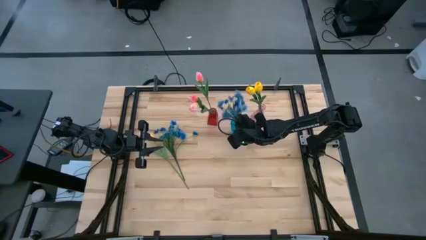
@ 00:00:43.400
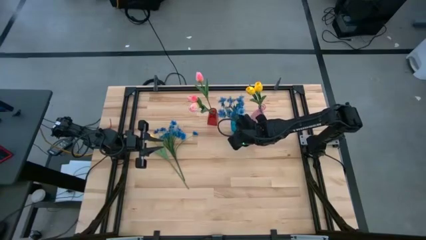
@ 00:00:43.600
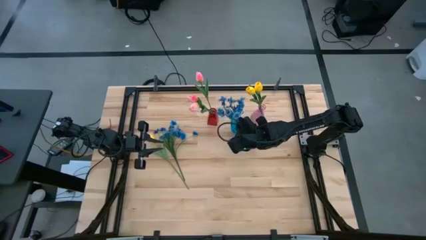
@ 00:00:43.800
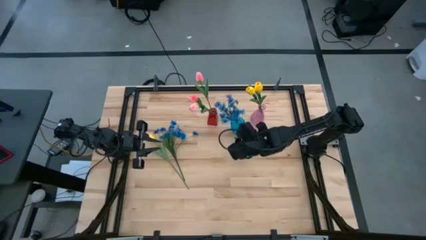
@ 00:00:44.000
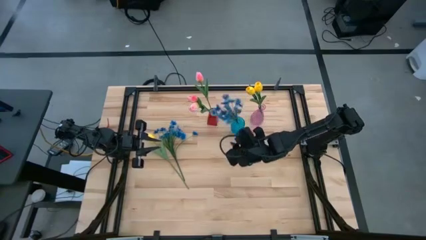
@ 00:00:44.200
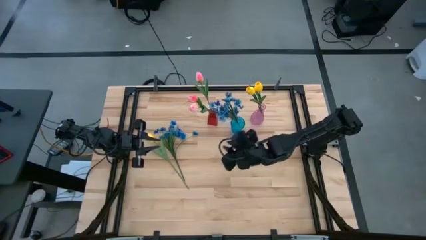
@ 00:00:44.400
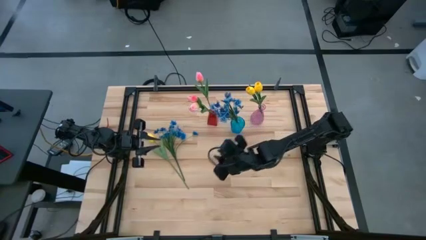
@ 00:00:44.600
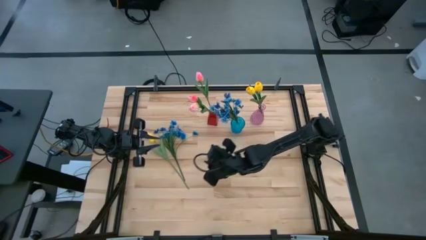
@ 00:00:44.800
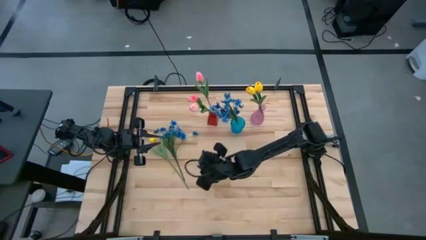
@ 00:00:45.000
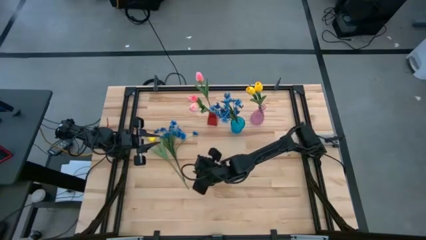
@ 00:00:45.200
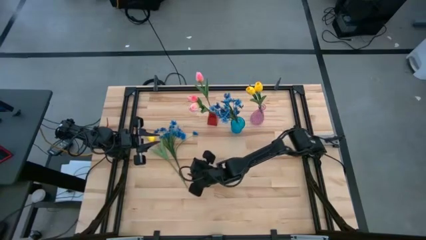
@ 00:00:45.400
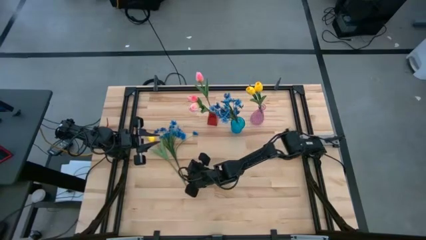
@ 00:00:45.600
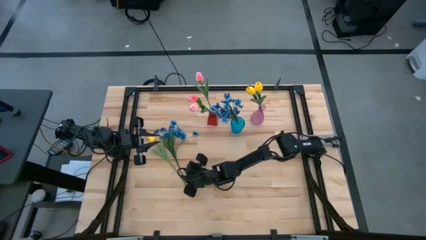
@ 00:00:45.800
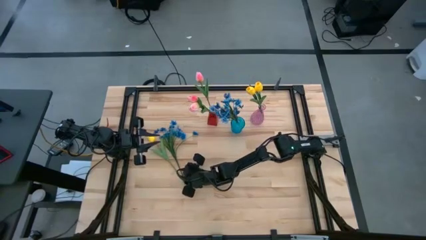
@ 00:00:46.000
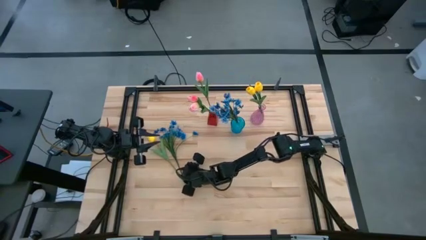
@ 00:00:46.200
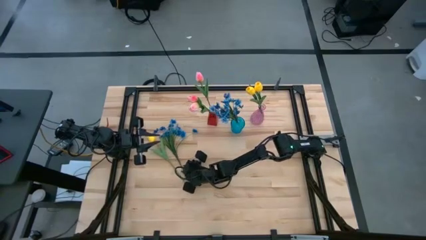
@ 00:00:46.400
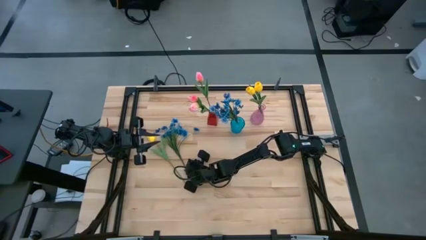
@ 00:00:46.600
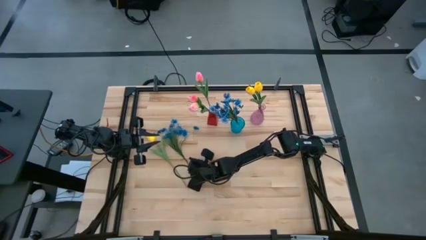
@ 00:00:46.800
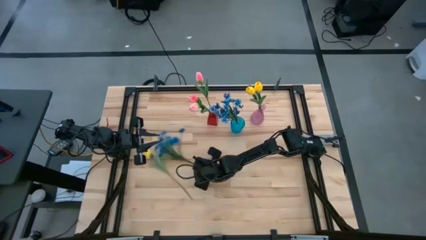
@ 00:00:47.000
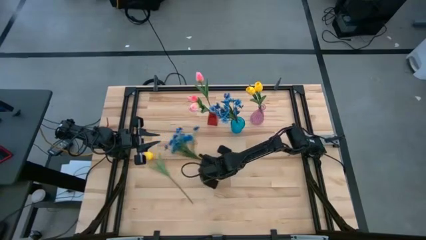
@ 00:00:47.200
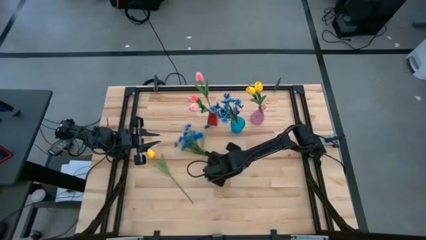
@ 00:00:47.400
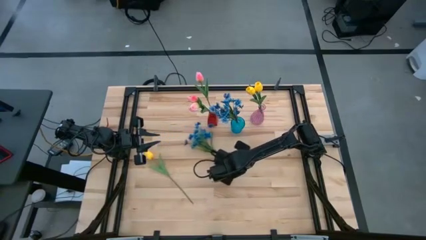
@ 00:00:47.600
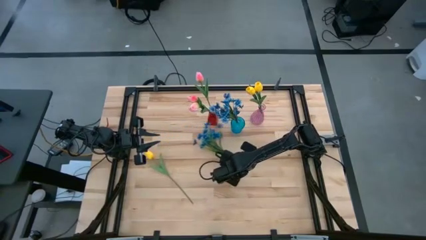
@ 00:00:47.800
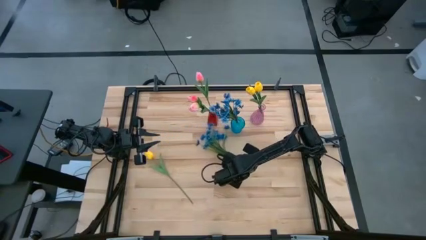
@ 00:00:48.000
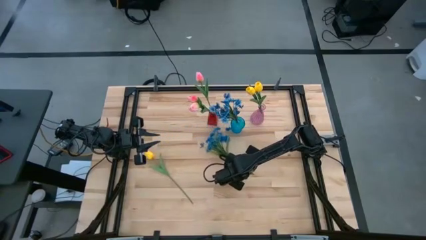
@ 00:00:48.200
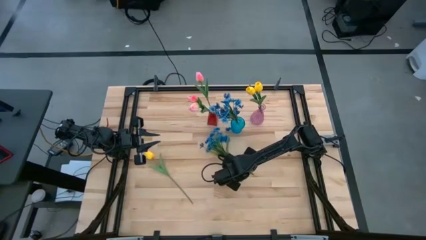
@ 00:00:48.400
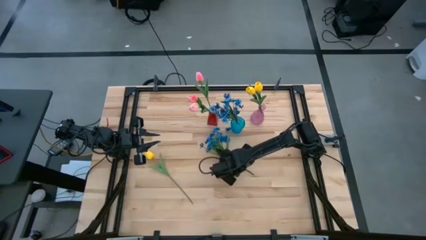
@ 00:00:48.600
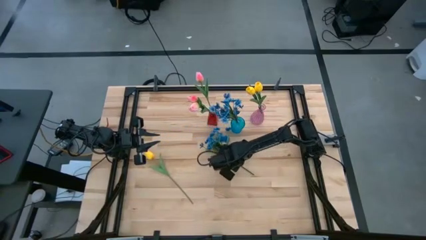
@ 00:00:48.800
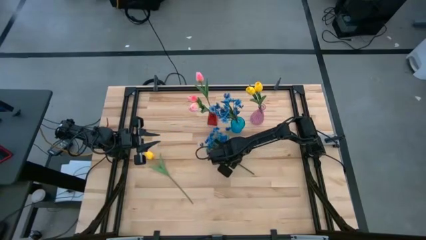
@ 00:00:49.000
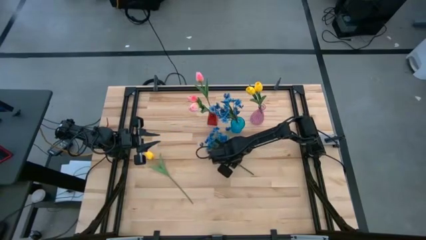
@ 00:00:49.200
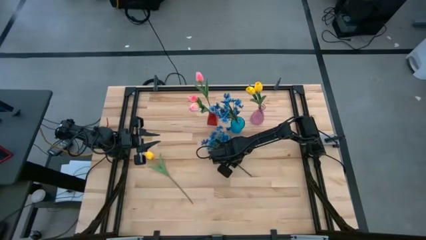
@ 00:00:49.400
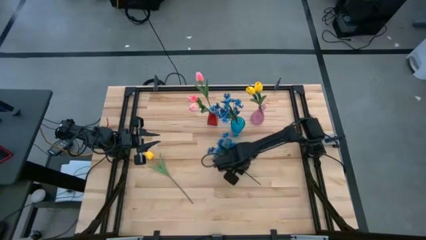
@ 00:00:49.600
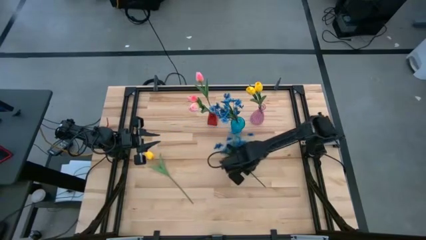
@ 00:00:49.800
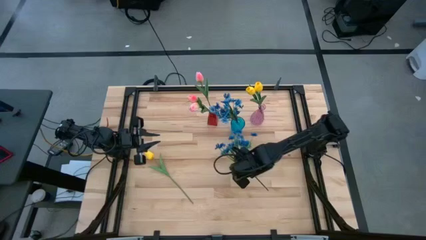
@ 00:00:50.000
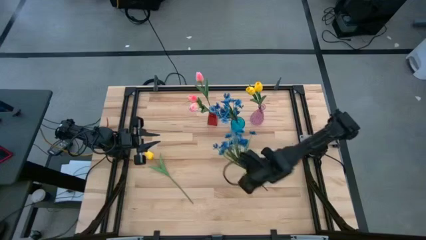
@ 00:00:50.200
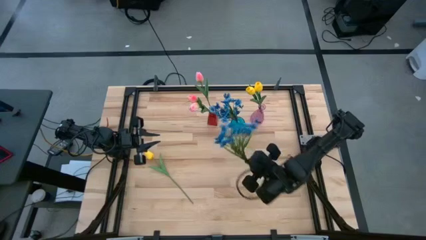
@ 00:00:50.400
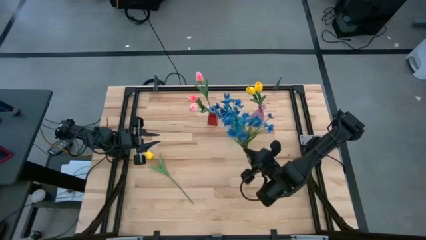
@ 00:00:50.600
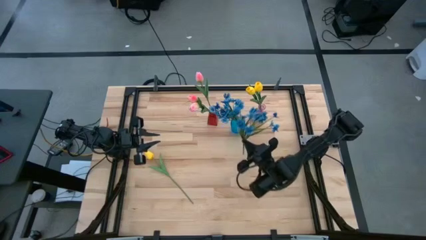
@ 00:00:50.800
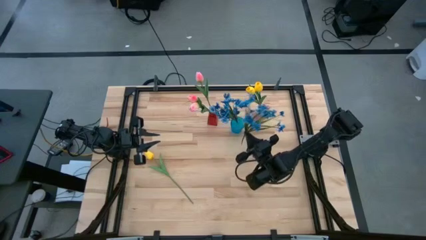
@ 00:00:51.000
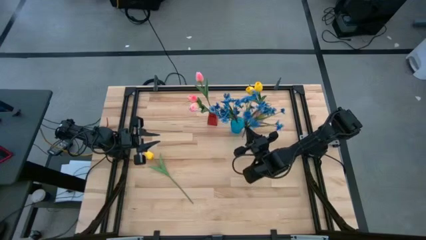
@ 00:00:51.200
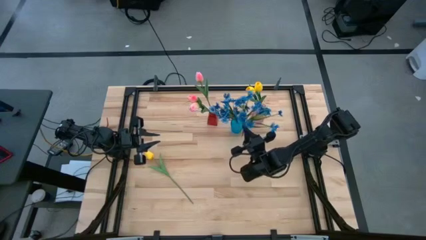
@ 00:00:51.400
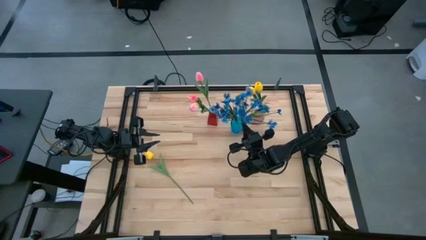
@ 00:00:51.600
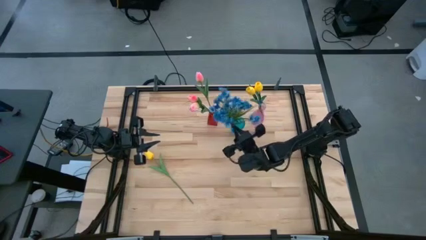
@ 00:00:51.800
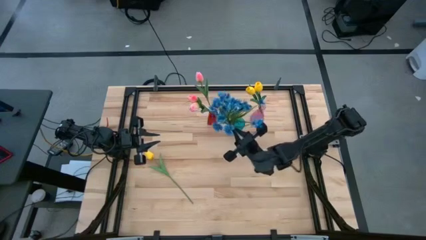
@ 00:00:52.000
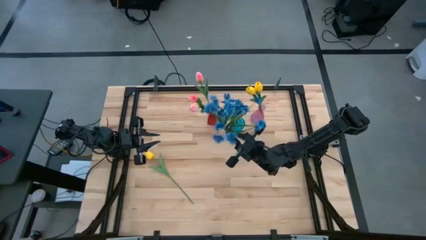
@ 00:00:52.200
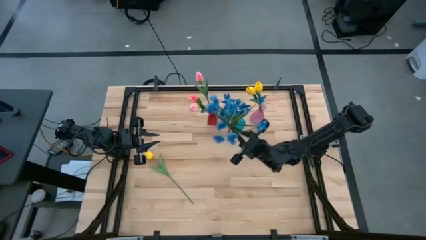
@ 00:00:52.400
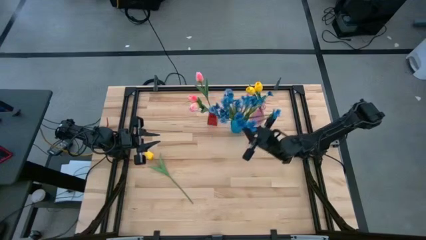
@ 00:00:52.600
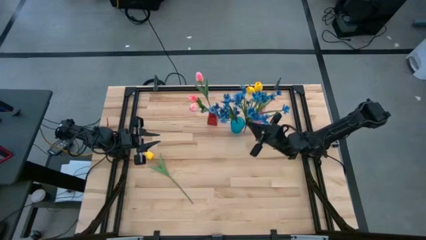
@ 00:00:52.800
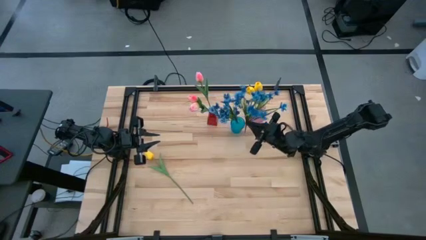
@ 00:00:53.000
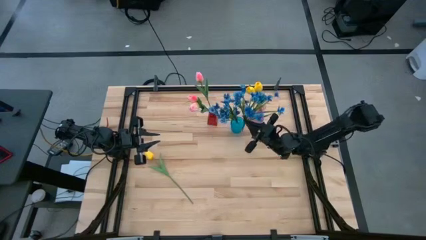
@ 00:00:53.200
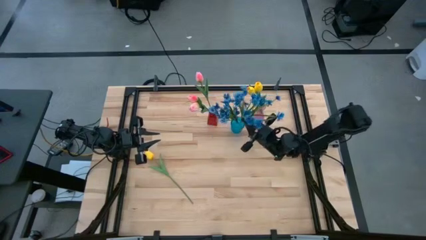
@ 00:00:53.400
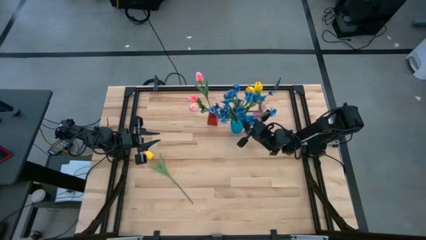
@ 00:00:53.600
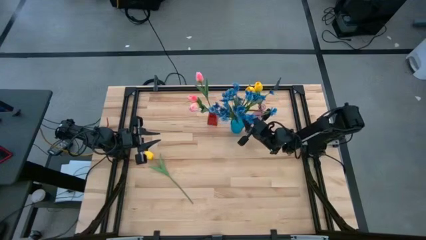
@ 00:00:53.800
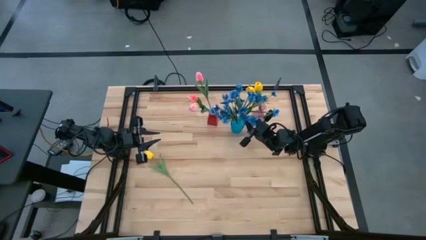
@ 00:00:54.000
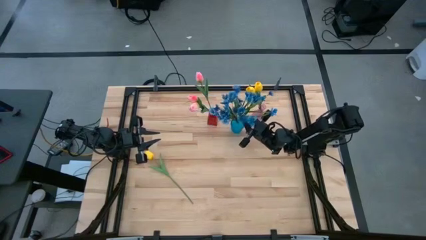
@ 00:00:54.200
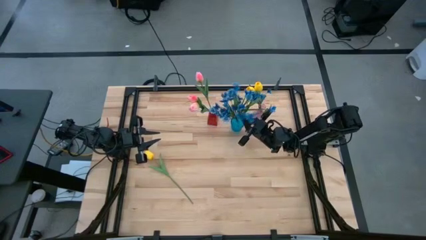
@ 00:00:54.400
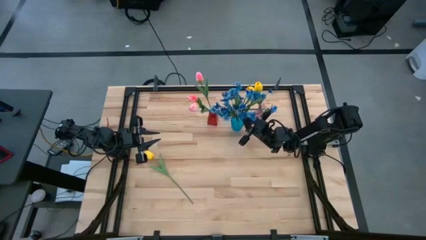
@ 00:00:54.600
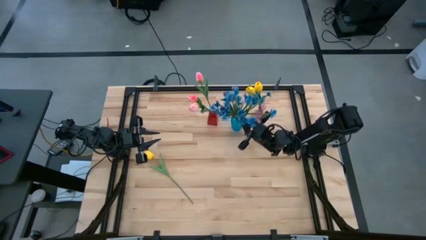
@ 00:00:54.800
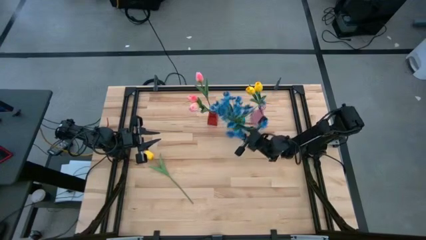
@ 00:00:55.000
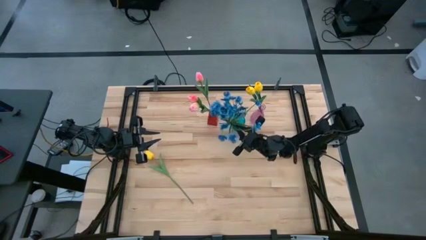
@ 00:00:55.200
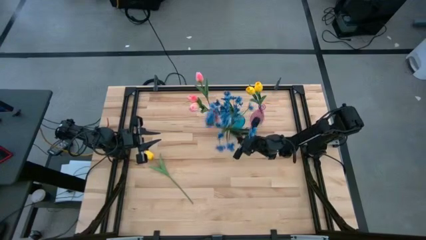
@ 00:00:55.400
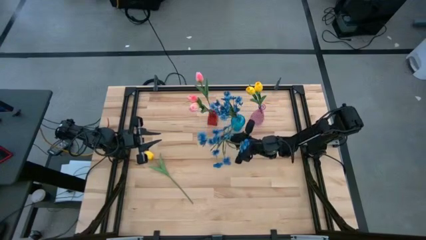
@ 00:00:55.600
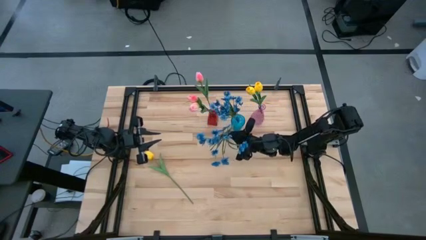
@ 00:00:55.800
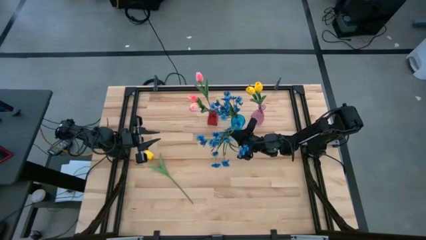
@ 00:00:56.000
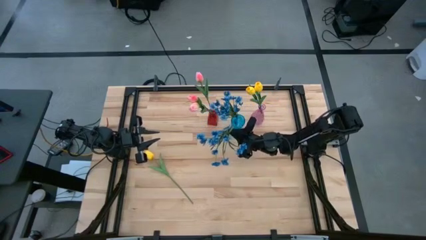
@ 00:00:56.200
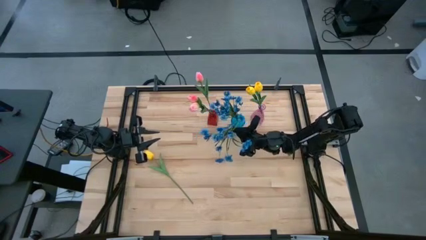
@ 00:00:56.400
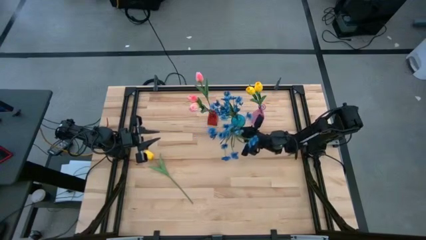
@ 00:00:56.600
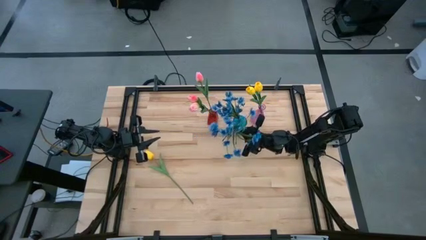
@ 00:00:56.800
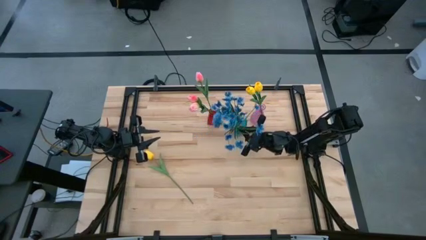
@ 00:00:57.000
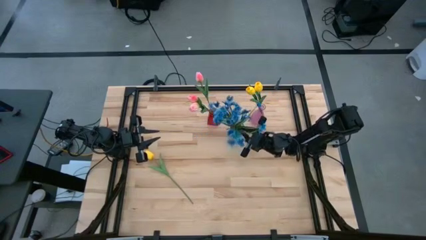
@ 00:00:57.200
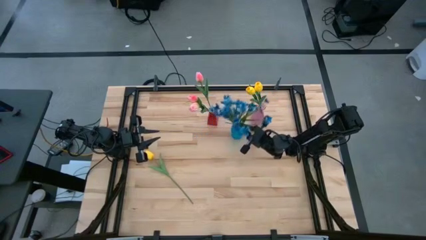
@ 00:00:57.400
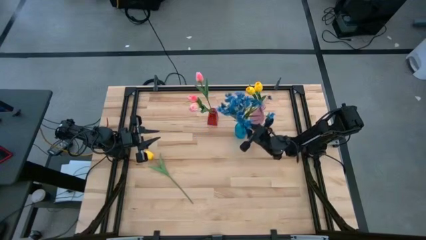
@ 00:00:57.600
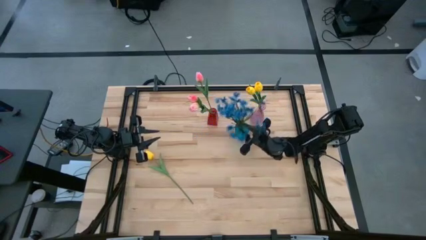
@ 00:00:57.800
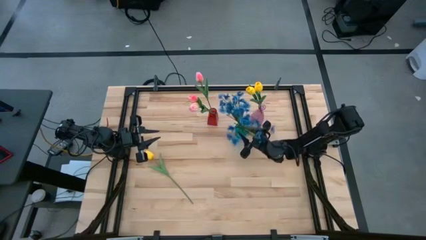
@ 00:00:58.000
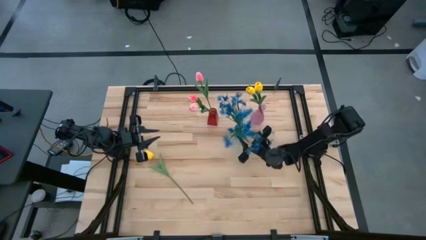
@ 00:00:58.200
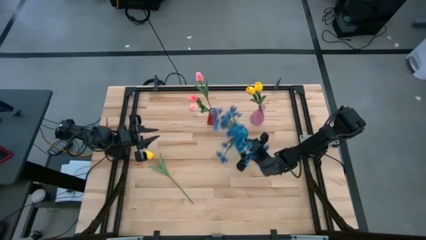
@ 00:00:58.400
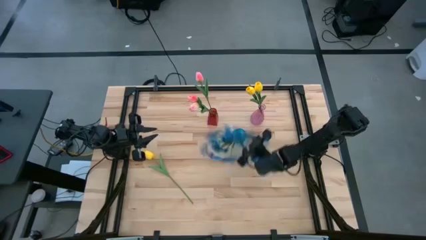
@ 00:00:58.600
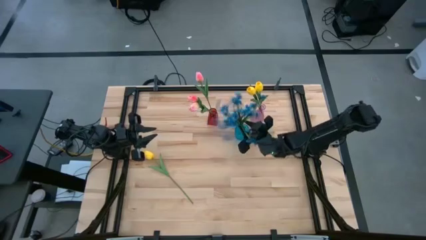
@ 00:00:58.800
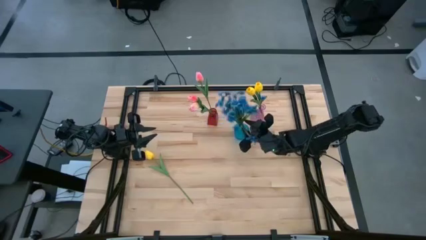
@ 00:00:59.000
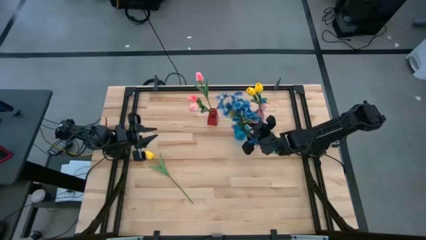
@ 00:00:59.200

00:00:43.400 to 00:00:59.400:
Task: Sort flowers into vase by color
Put the blue flowers into the blue vase

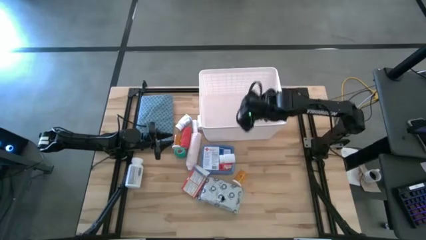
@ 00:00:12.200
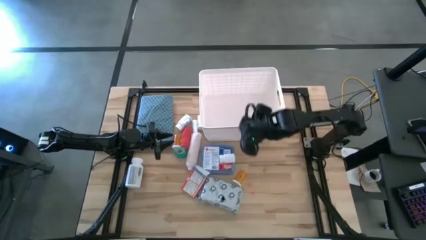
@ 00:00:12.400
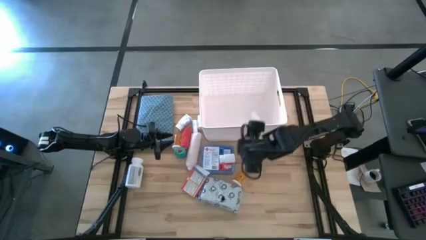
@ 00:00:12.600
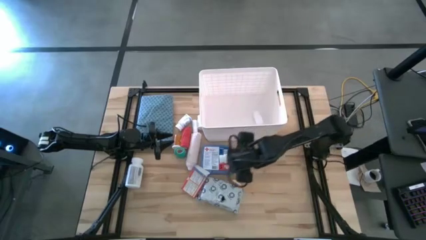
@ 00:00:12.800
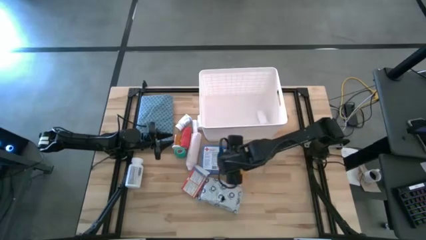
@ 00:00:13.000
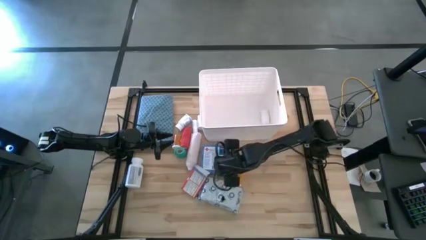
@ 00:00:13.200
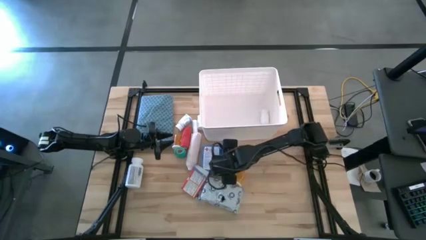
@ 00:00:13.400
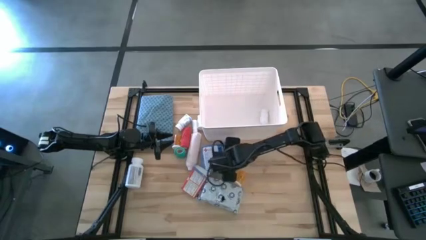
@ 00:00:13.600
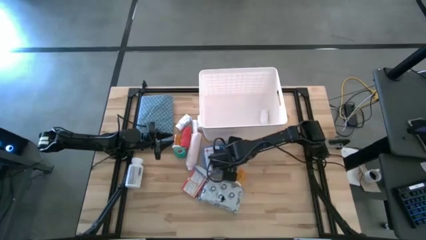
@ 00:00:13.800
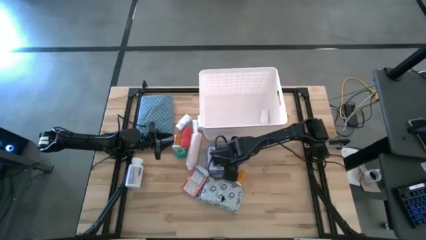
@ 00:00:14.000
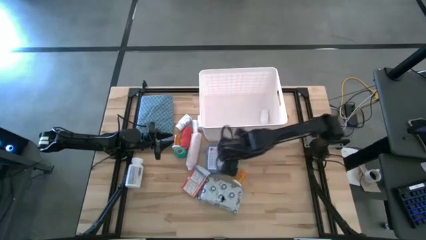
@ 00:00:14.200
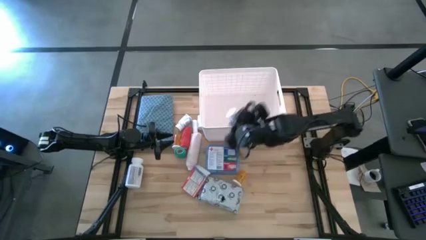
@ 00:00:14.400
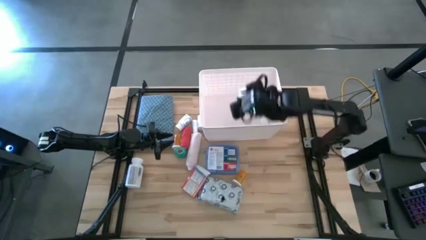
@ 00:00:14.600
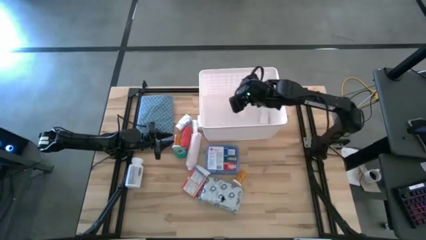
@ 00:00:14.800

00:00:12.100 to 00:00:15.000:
Task: Pick & place medical supplies in basket/bin
Put the white pill bottle into the white bin
